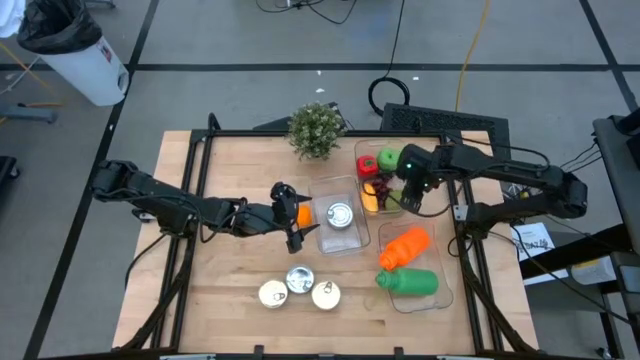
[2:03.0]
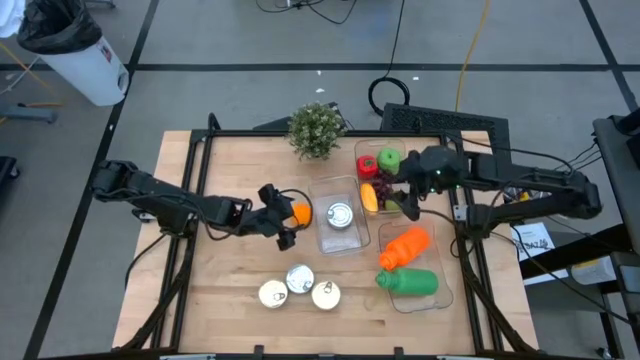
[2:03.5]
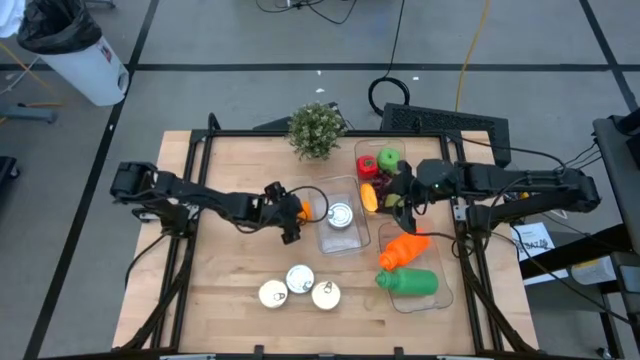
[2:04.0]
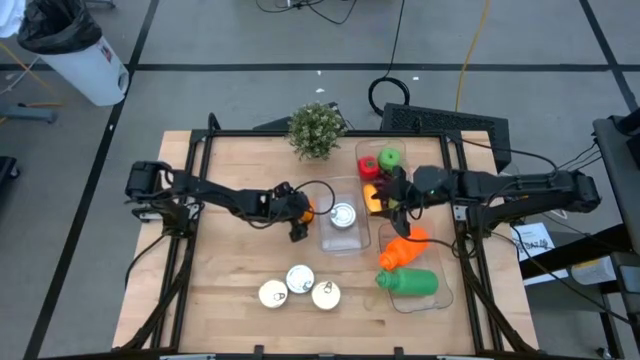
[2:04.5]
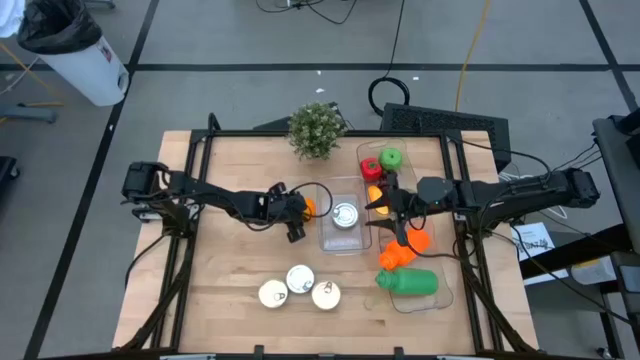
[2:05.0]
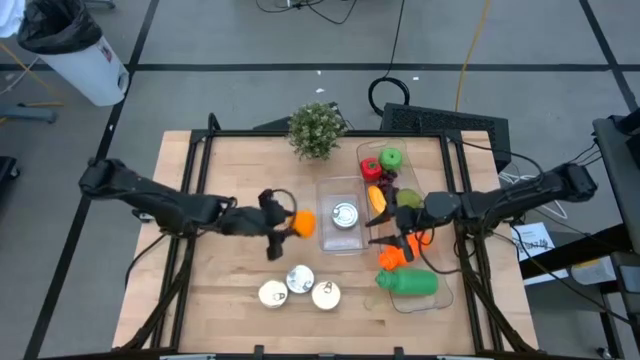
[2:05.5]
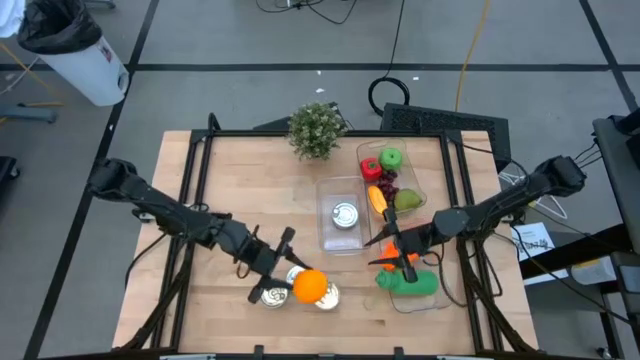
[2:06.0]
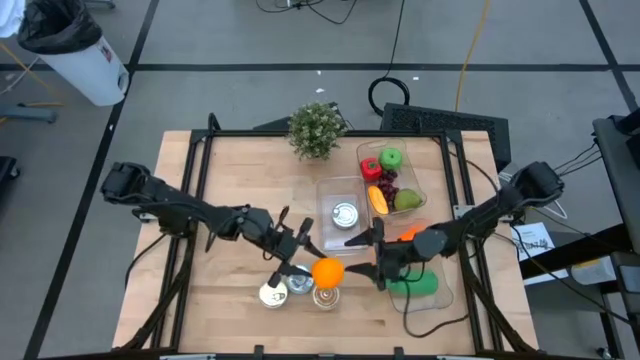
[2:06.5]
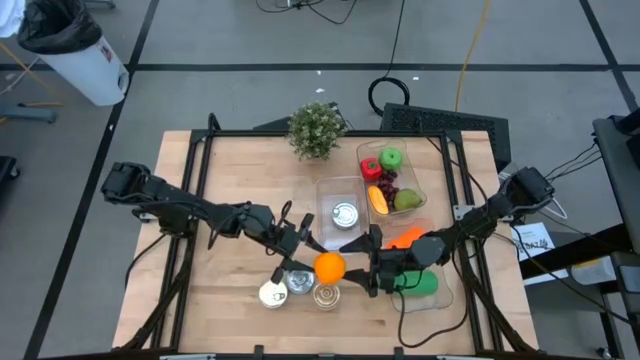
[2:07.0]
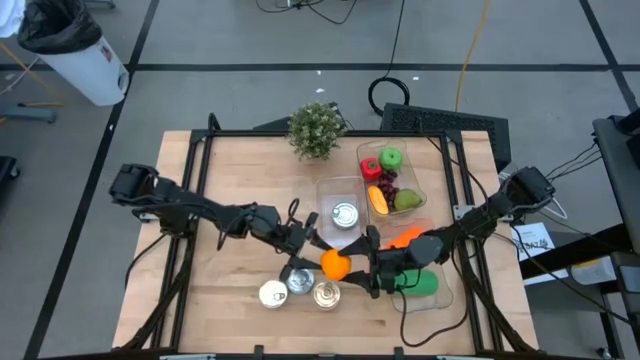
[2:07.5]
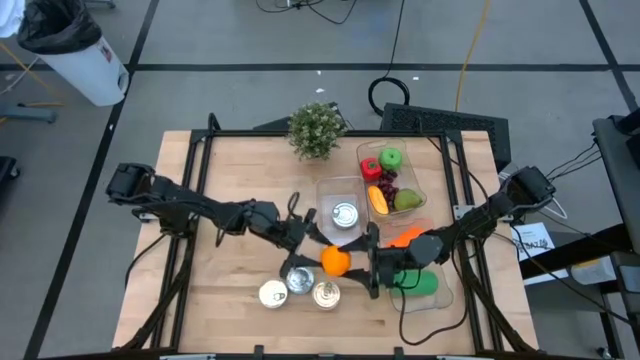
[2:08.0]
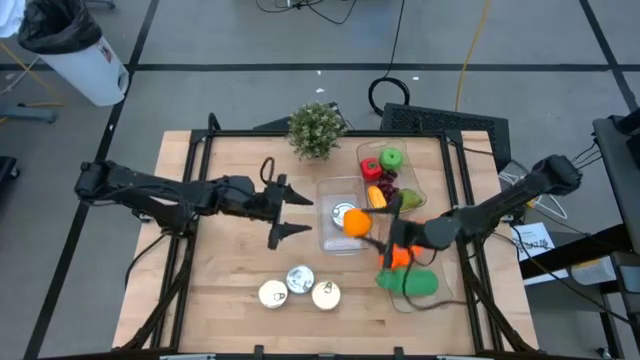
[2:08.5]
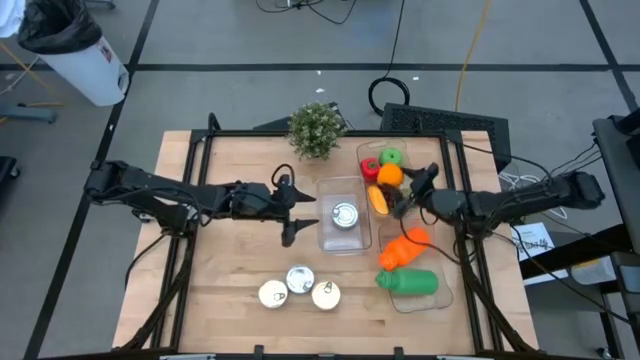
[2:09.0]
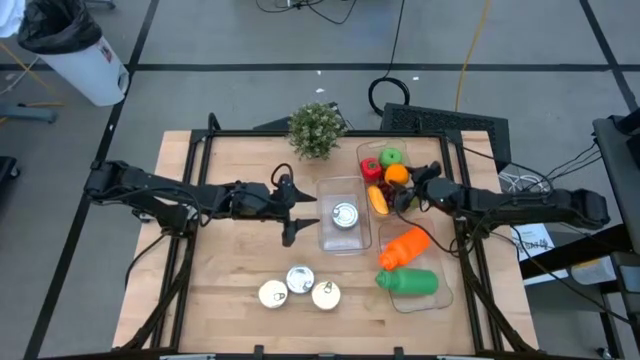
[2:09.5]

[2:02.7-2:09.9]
Task: Pick & Place Food Item
Put the orange into the top transparent bin

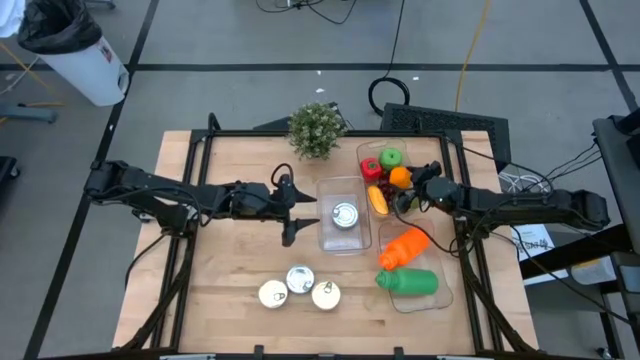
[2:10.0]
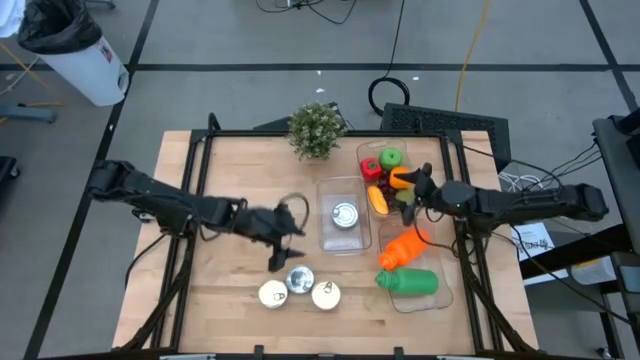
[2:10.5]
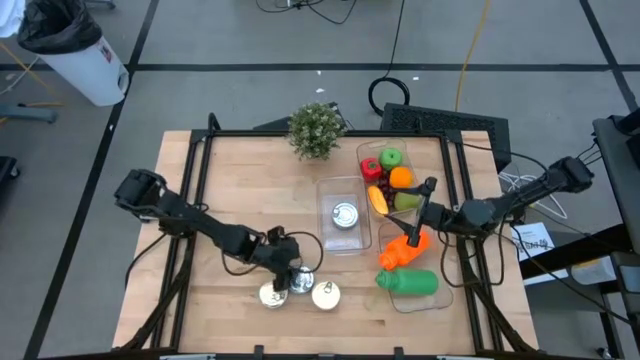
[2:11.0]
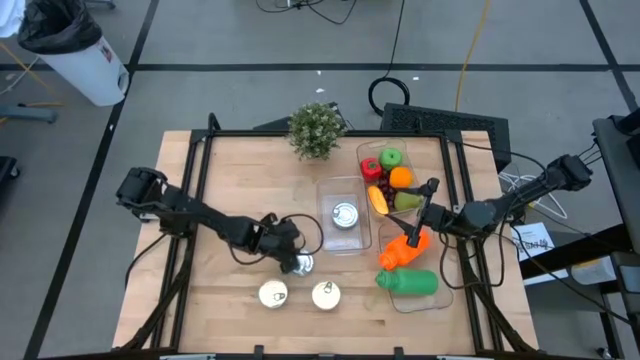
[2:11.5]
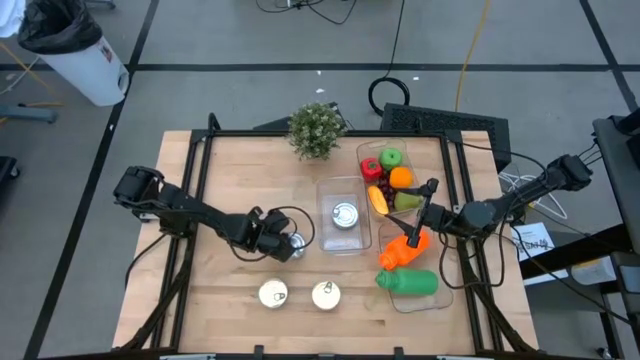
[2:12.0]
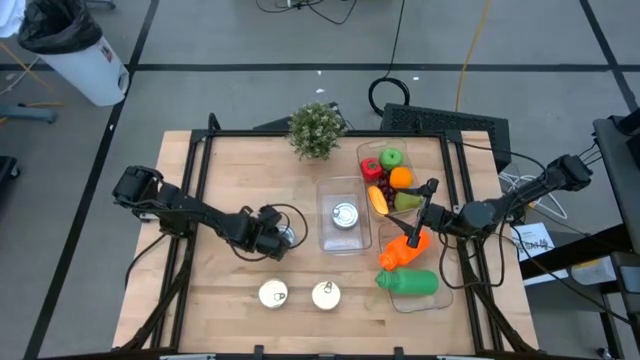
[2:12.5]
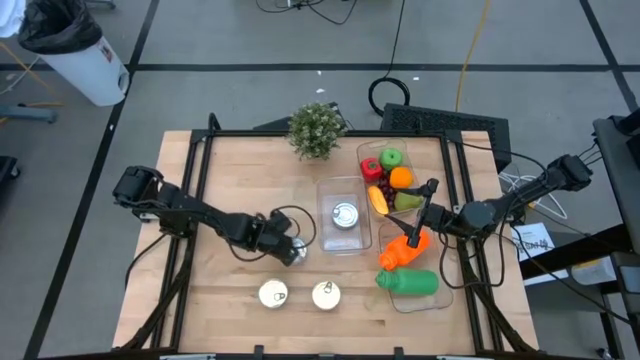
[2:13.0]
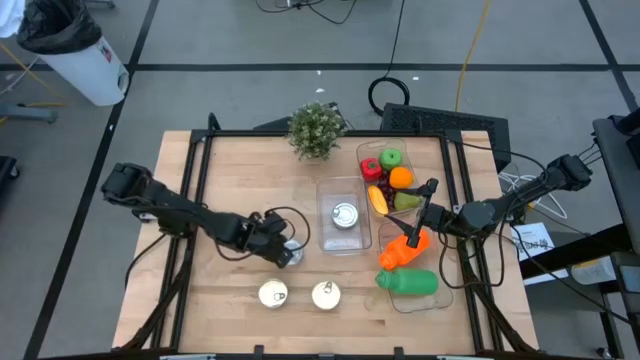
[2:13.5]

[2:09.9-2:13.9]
Put the green tuna can into the middle transparent bin

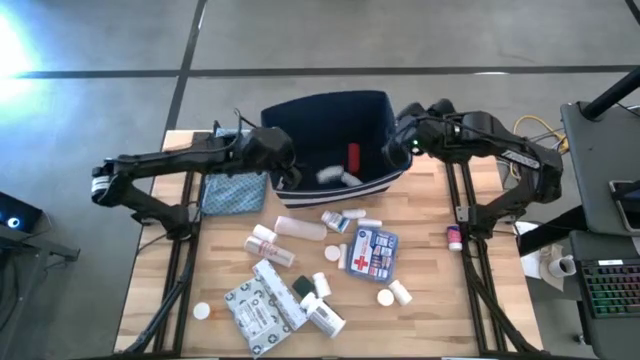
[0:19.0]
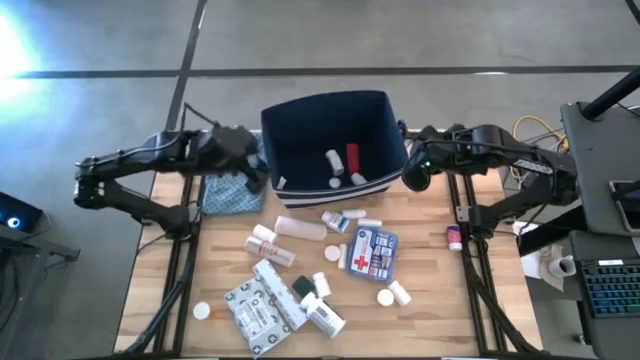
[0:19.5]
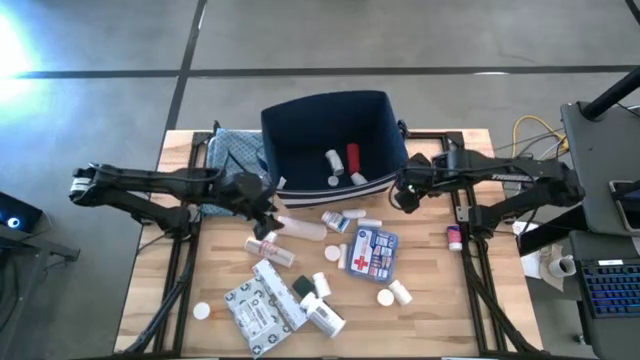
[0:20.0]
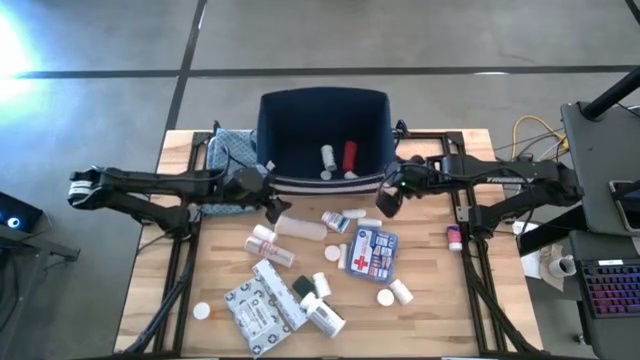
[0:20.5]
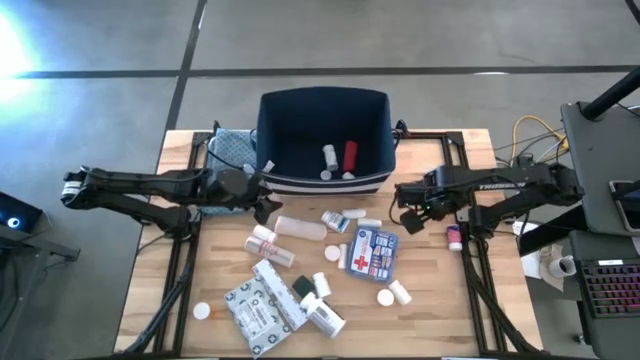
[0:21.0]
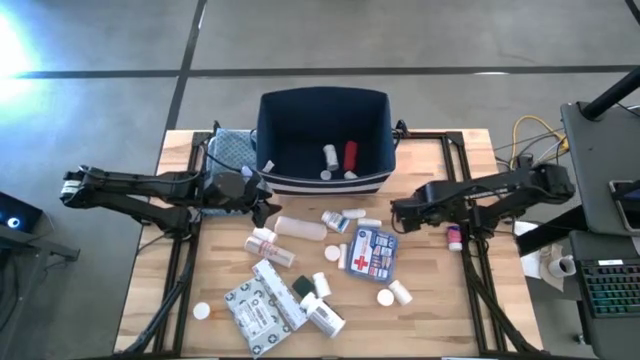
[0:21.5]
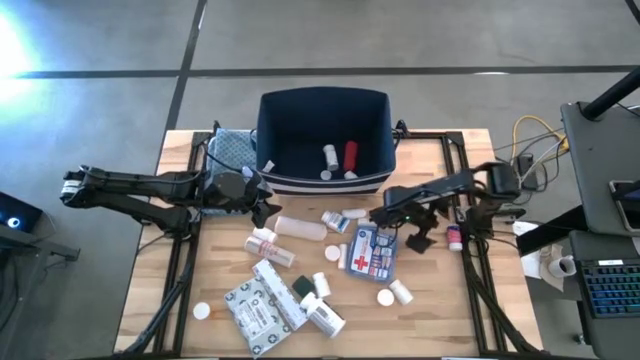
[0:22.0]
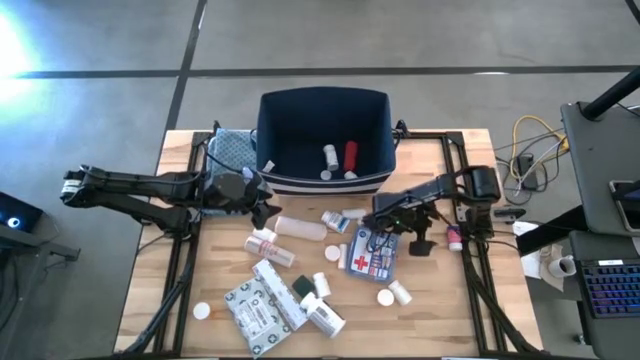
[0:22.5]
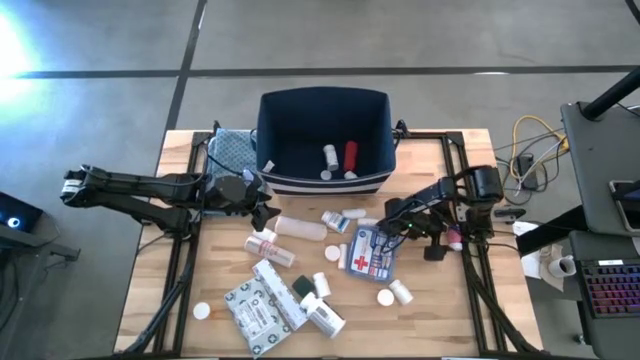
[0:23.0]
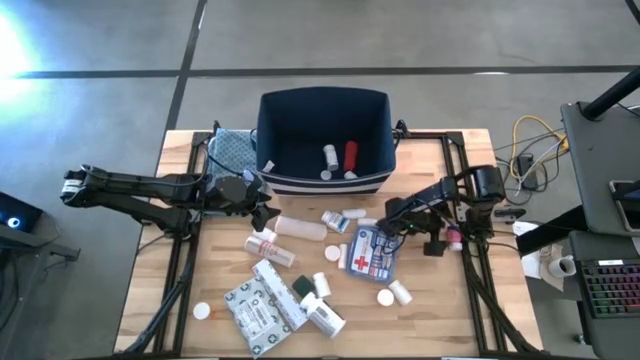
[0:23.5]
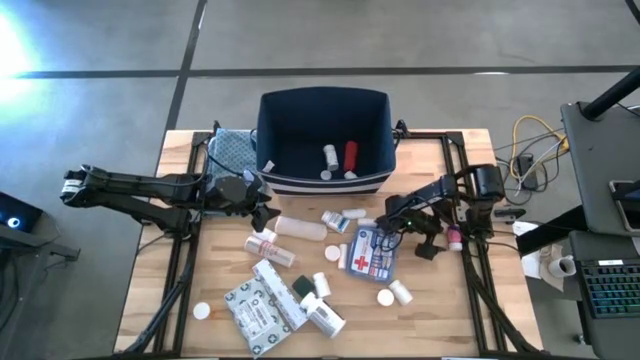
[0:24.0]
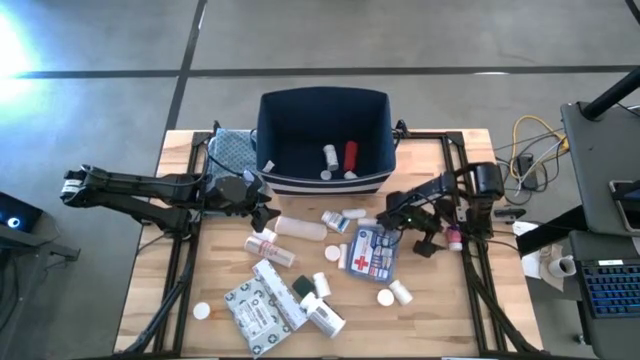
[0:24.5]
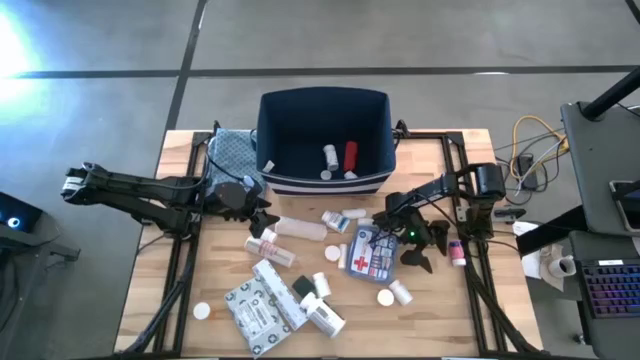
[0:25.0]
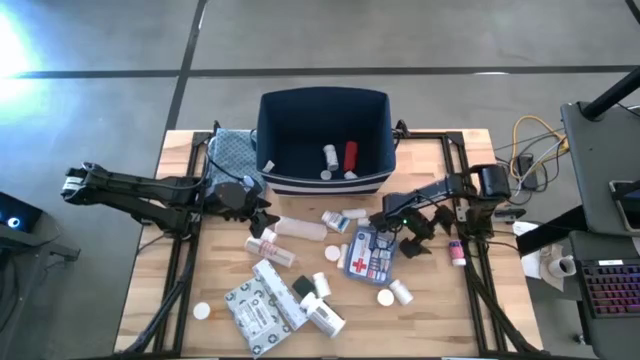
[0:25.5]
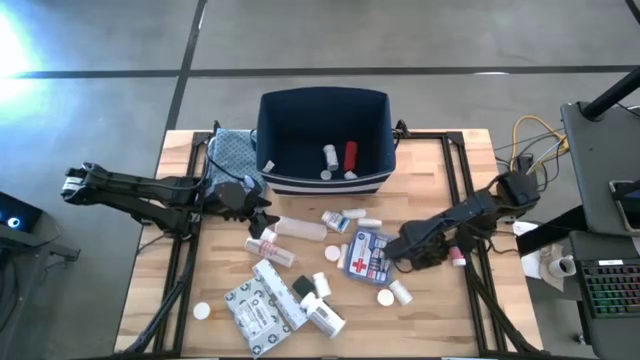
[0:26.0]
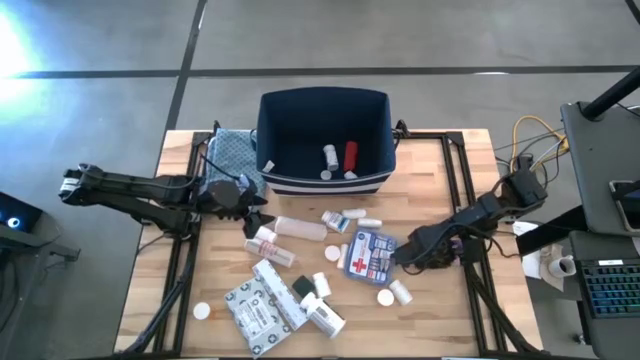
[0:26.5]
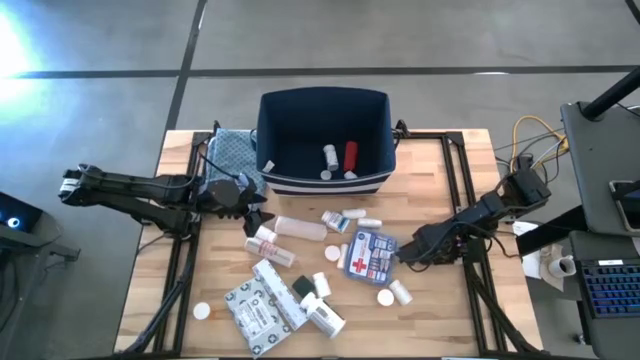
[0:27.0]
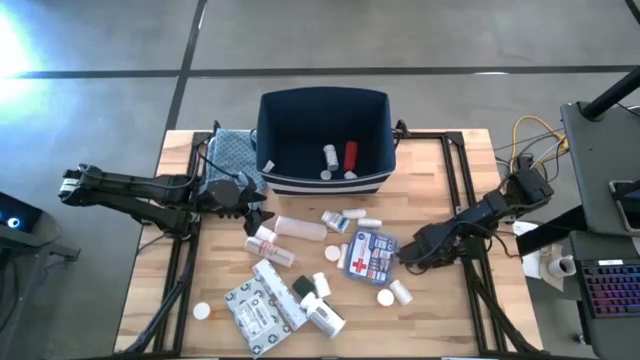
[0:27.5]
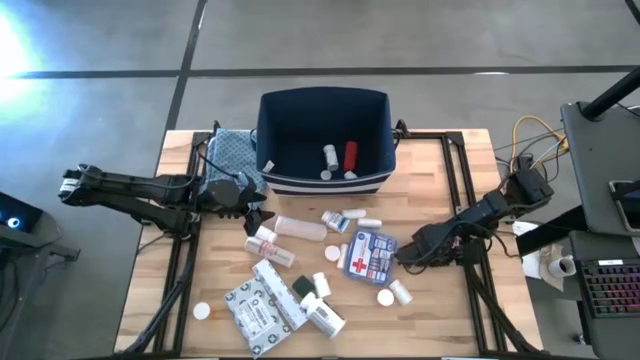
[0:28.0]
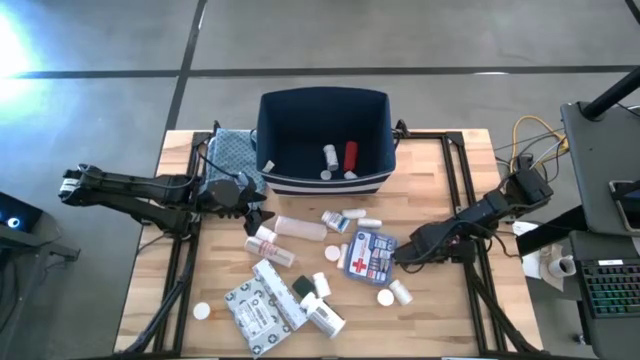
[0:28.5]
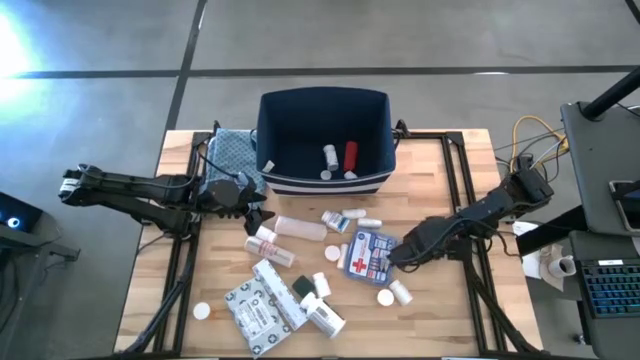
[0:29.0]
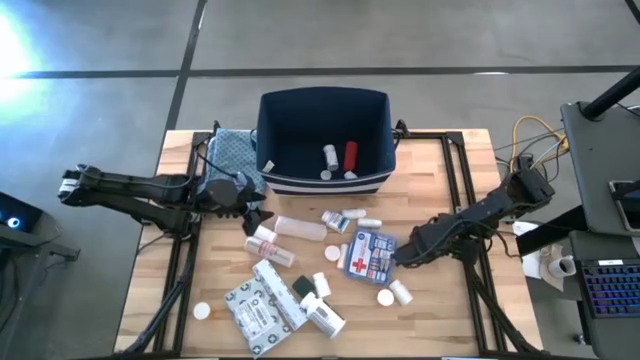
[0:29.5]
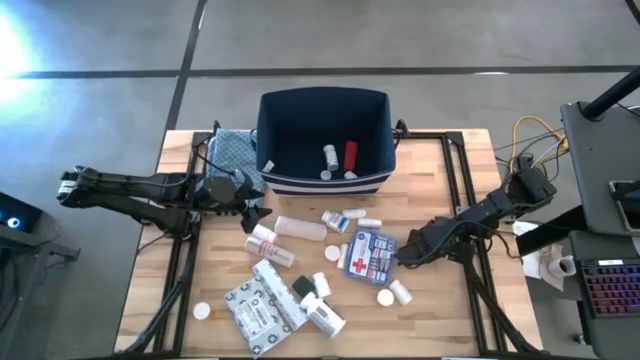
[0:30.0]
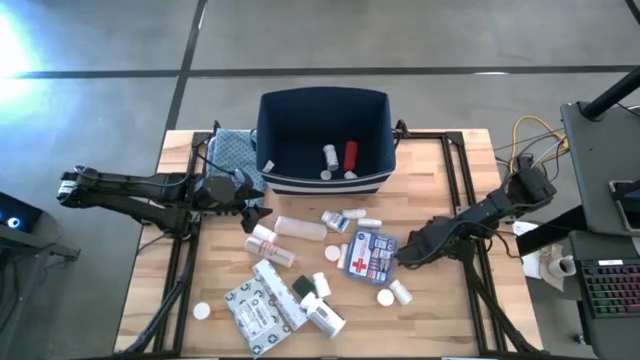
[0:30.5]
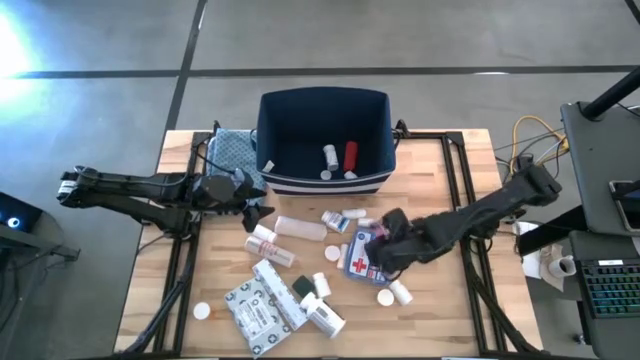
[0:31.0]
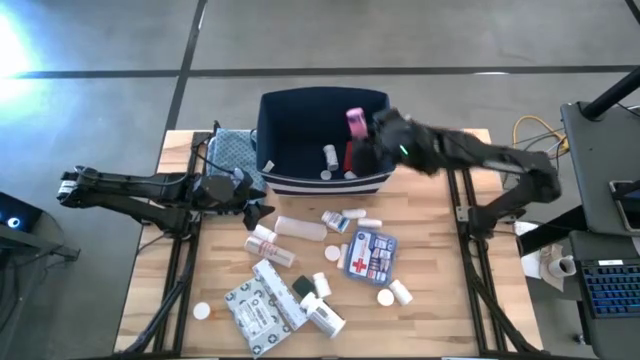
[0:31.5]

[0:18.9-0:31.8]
Task: Pick & place medical supplies in basket/bin
Put the pink pill bottle into the blue bin
